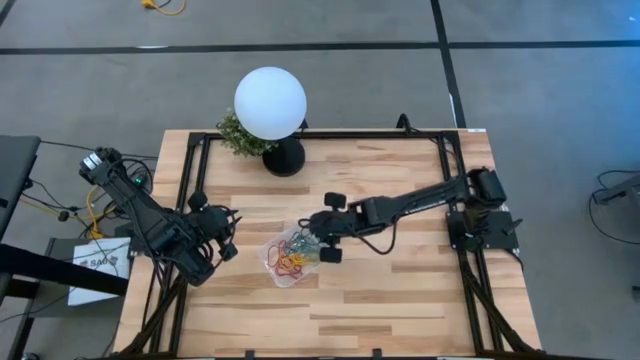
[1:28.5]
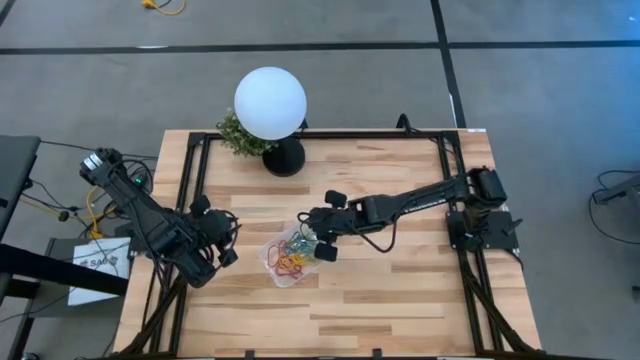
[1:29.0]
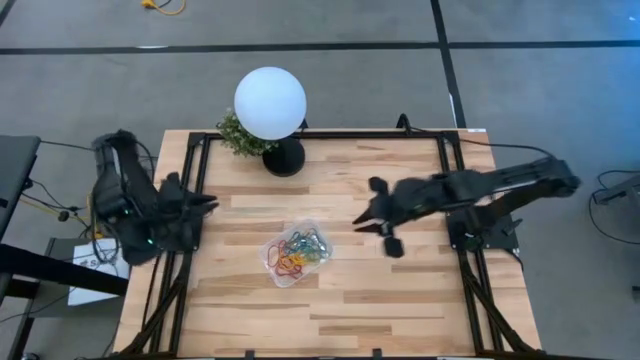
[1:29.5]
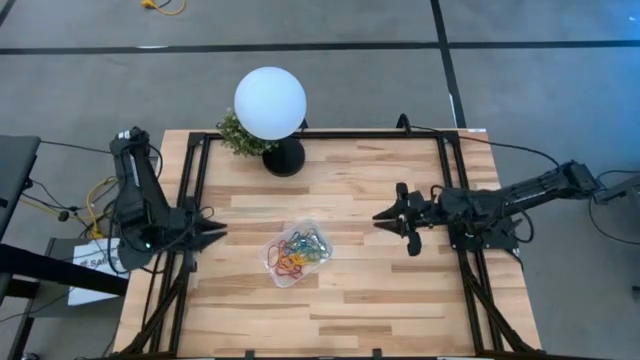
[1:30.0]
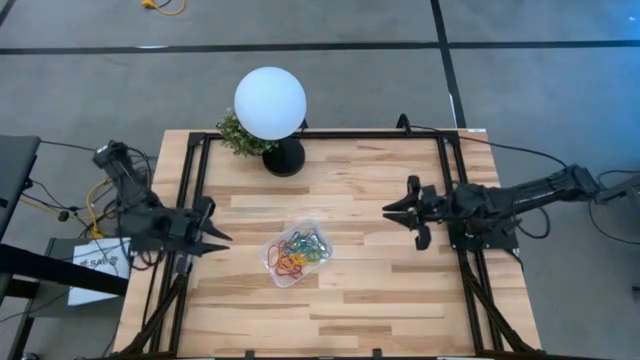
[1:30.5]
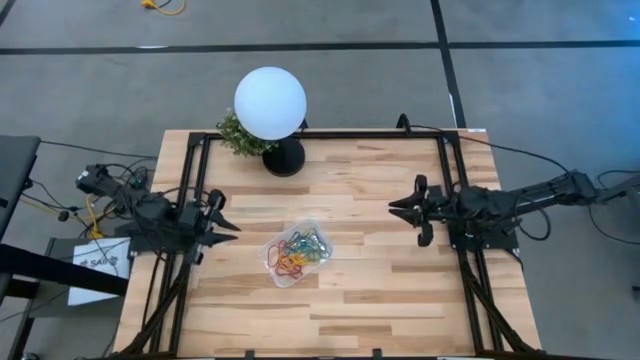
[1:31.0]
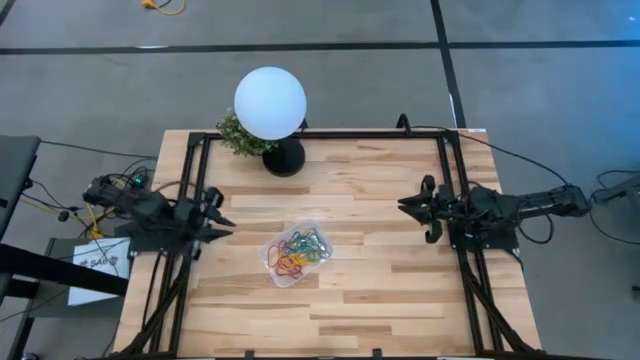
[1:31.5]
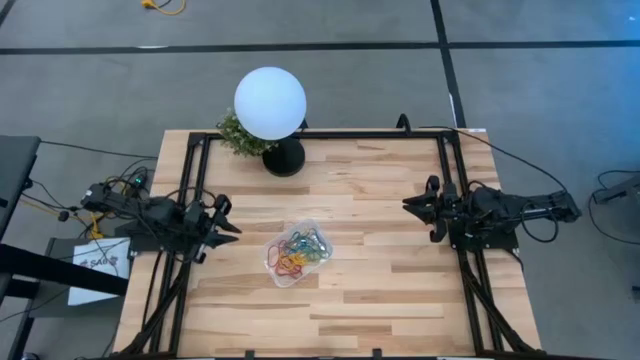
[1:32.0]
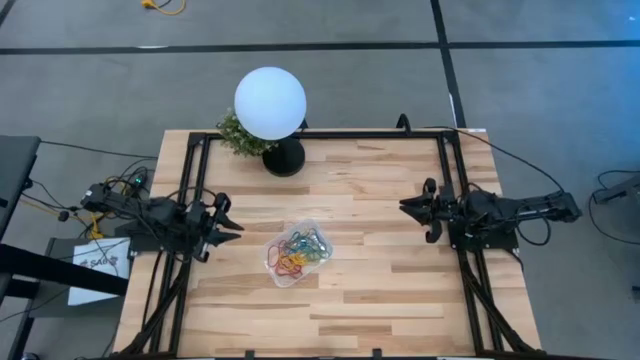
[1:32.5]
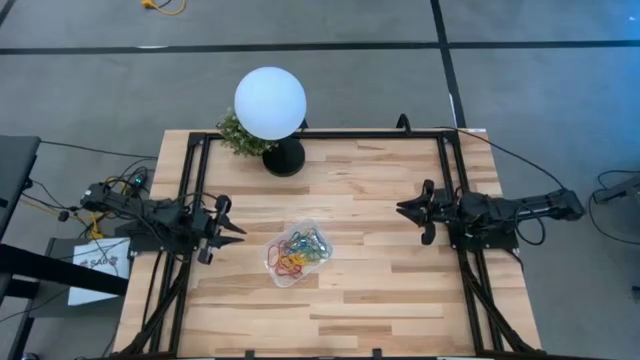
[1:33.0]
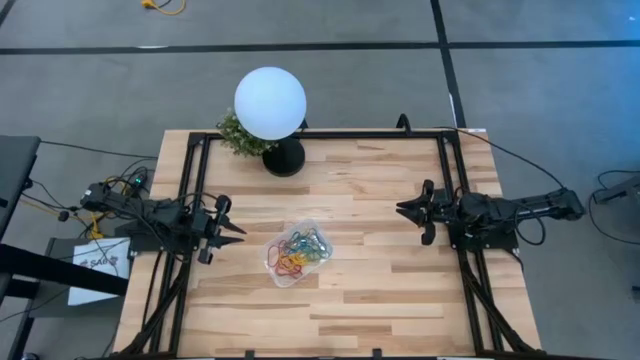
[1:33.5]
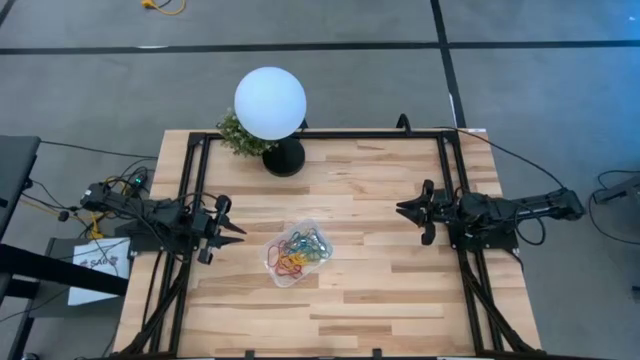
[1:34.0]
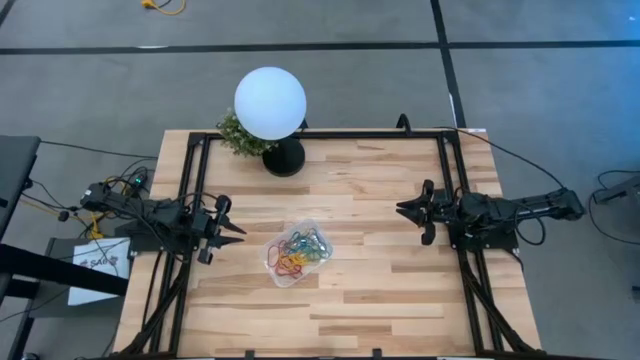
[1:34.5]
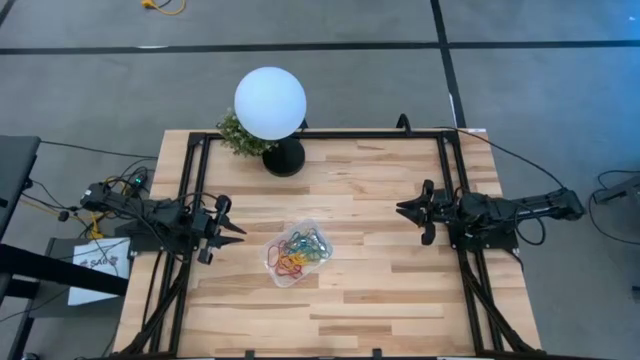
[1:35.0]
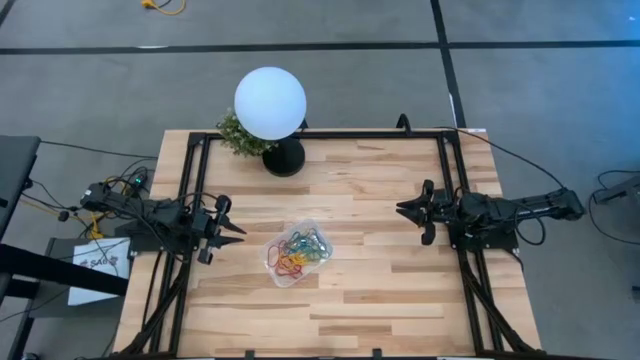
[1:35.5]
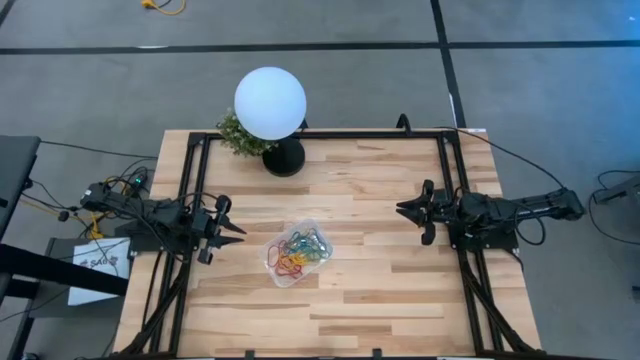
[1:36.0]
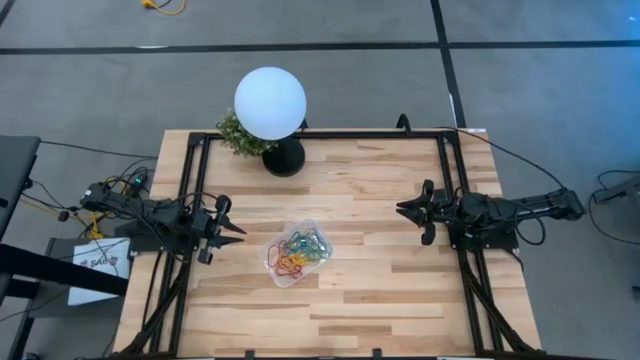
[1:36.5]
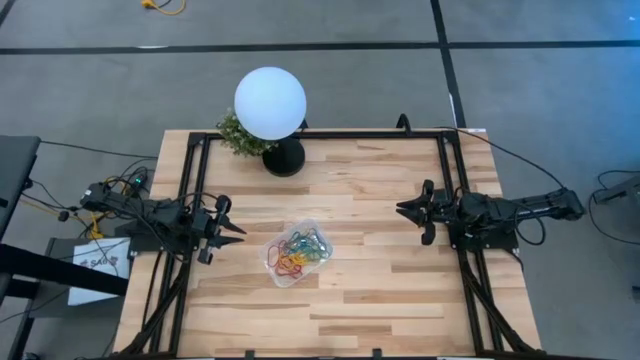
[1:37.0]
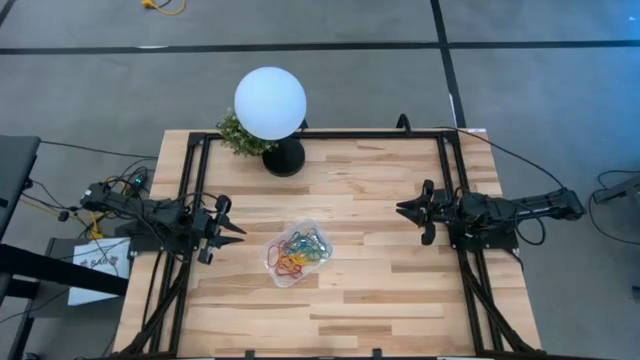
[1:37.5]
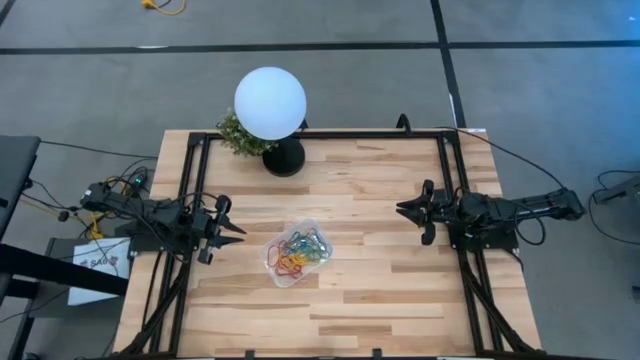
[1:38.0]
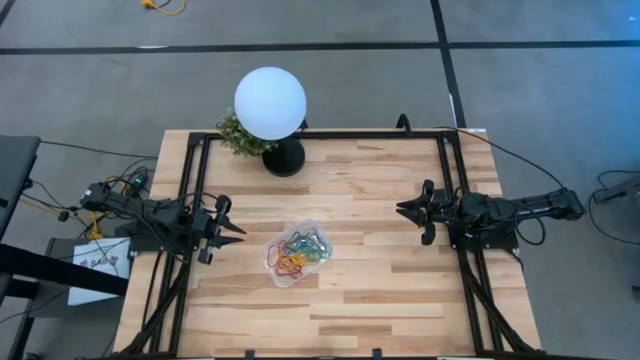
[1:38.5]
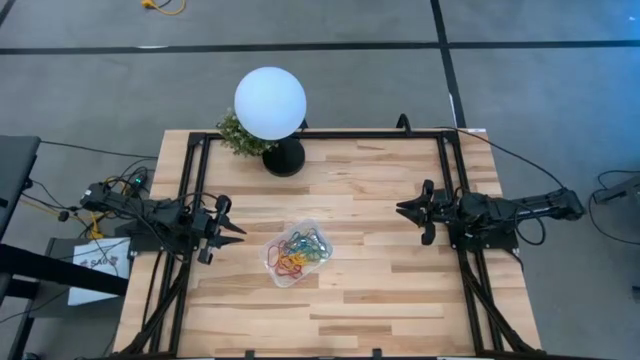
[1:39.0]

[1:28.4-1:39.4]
Task: Pick and place items into bin
Return to Home Position

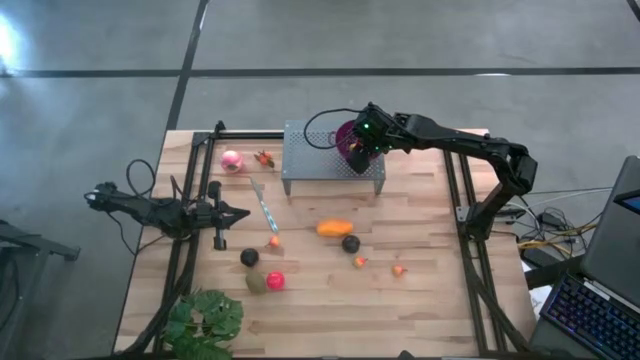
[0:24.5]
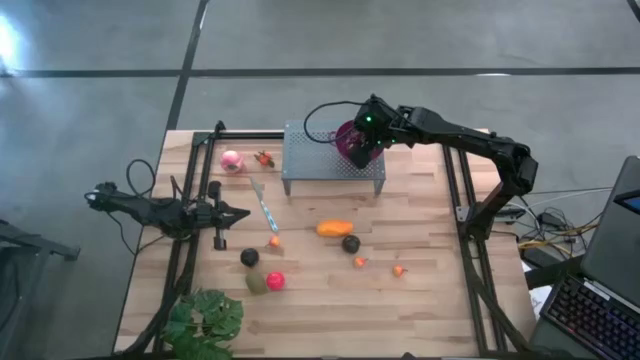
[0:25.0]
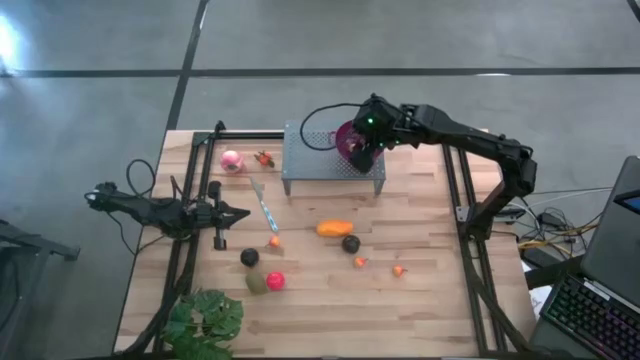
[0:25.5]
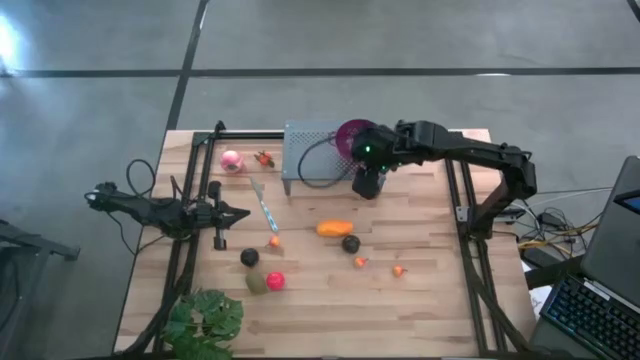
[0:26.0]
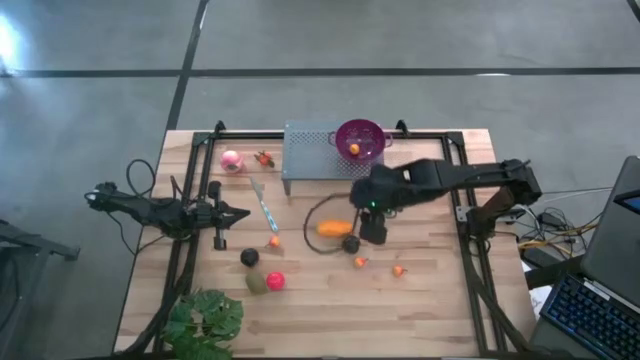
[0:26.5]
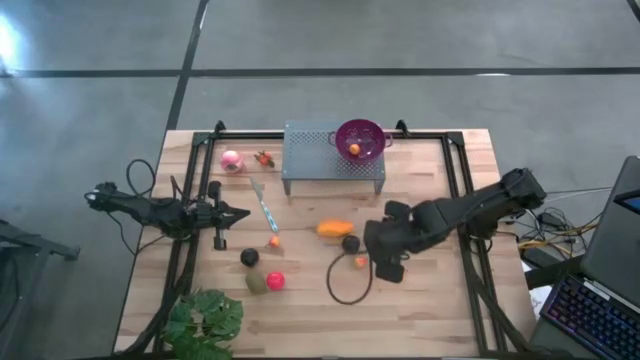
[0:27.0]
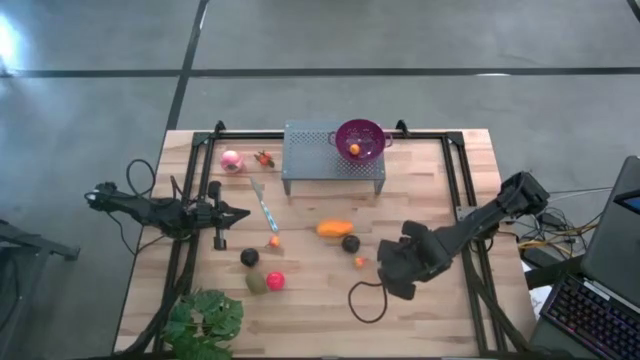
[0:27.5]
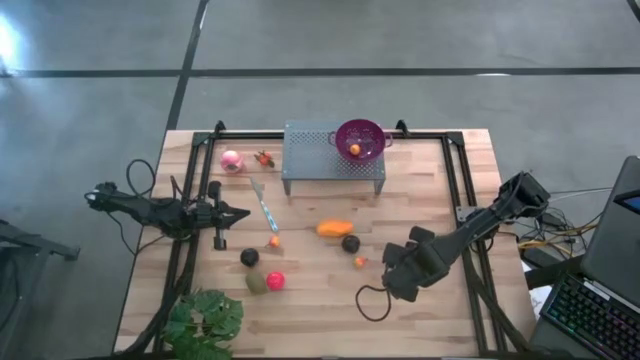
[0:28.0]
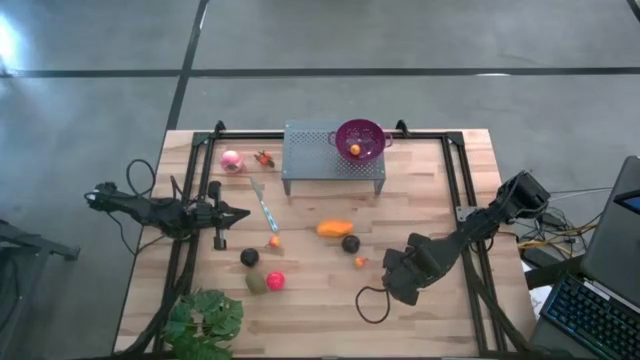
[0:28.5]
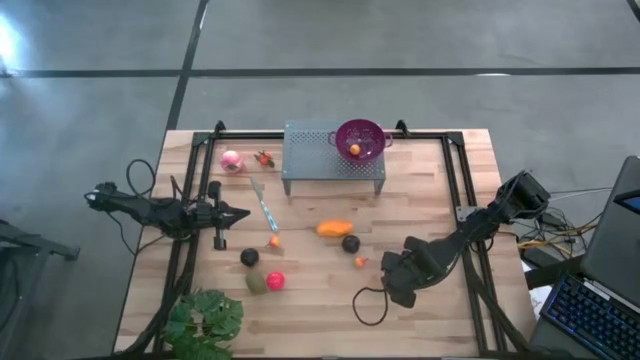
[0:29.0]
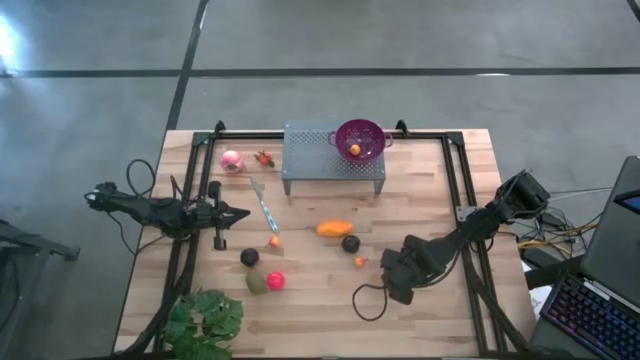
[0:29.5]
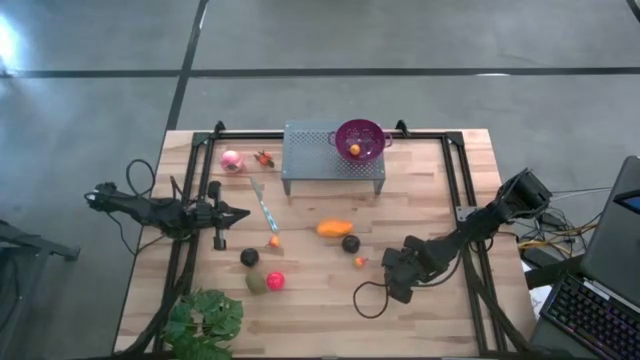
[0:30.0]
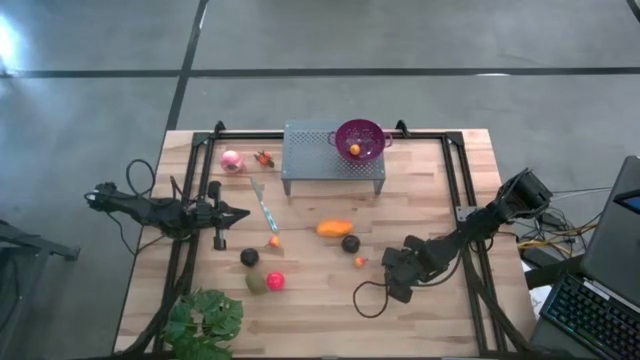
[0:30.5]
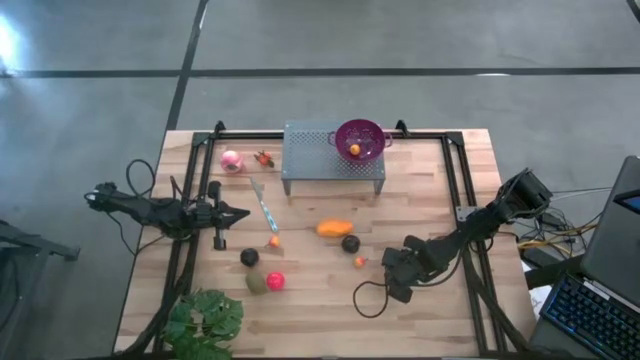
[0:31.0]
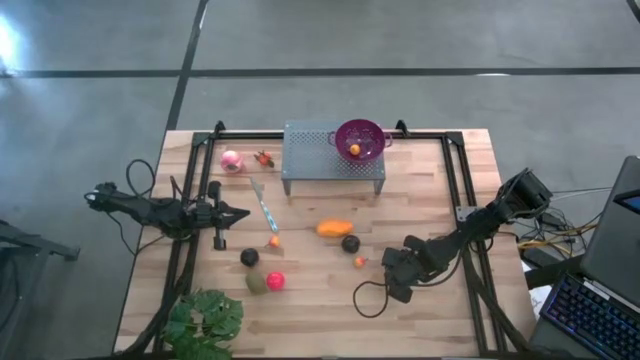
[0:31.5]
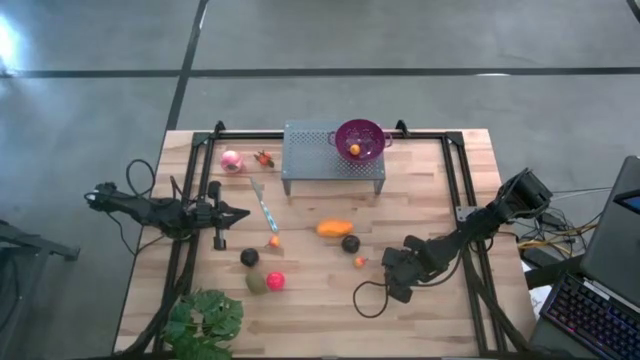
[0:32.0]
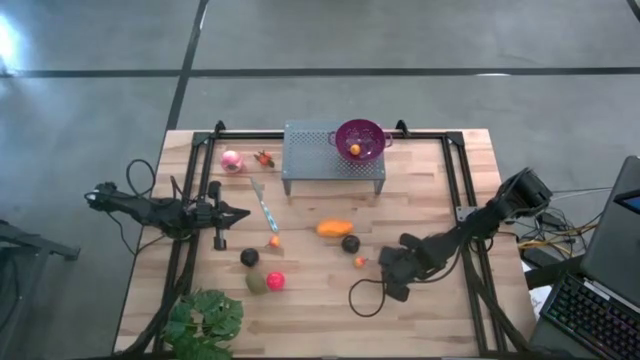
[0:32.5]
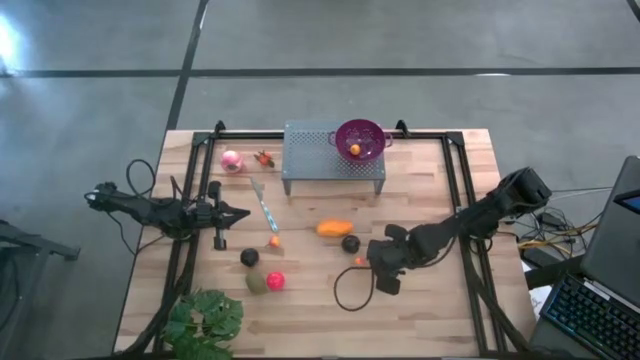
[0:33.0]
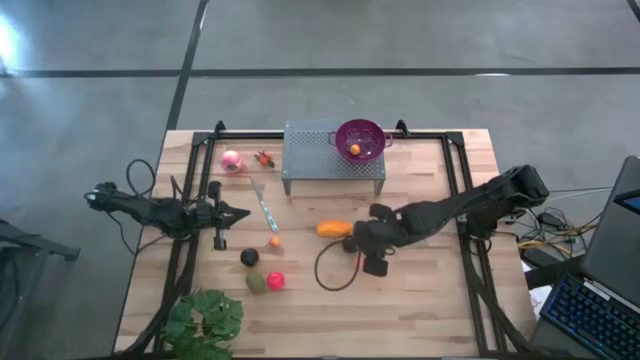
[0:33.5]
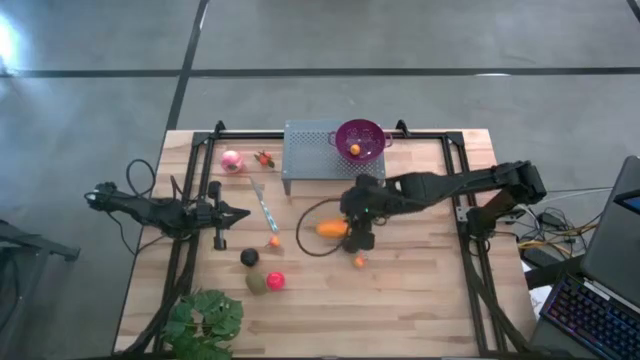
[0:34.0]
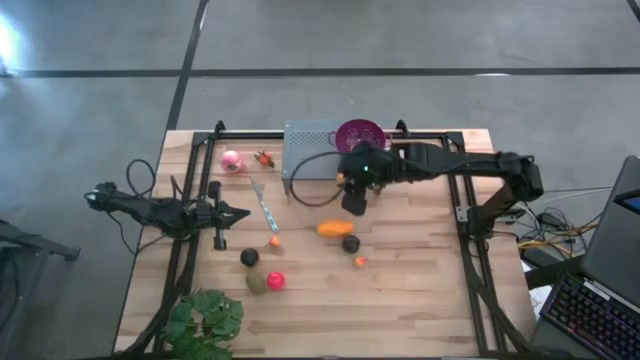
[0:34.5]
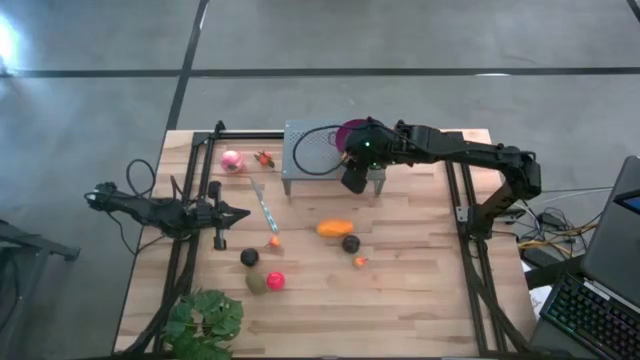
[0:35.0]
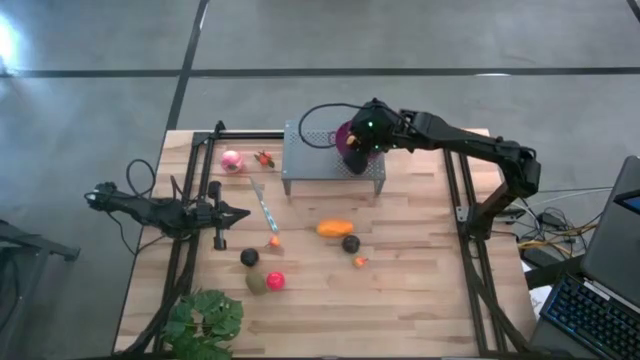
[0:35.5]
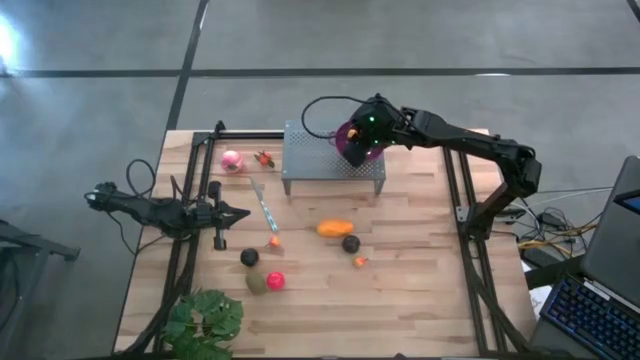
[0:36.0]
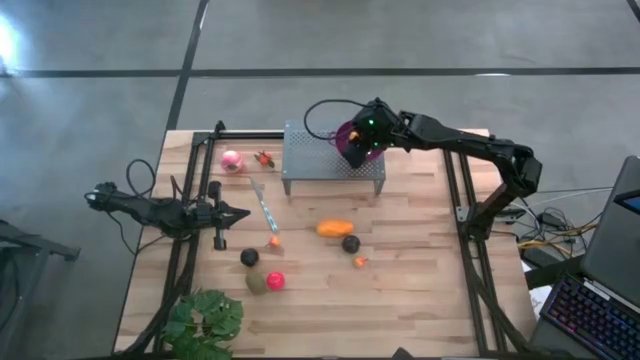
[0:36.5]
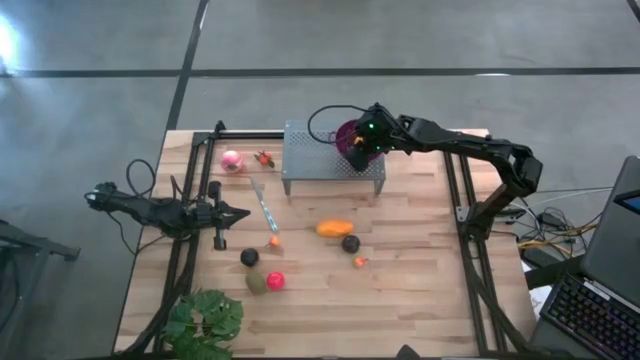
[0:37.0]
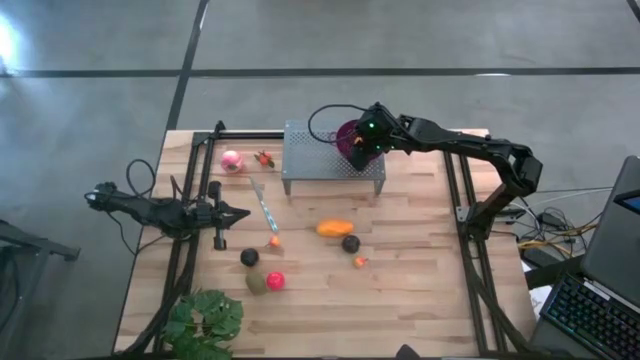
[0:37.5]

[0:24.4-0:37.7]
Task: Pick & Place Fruit
Put the pear into the purple bowl on the shelf
